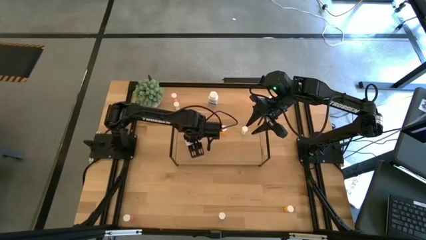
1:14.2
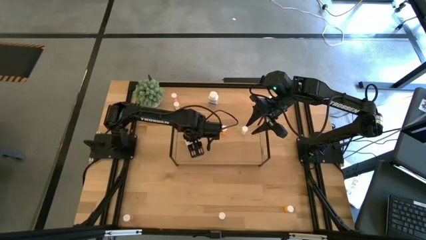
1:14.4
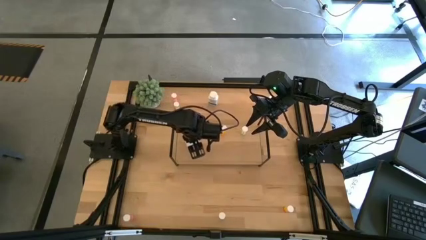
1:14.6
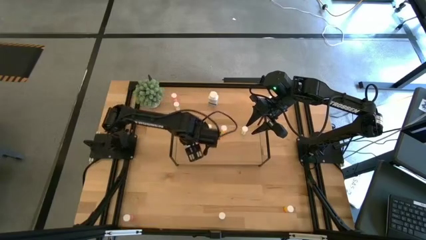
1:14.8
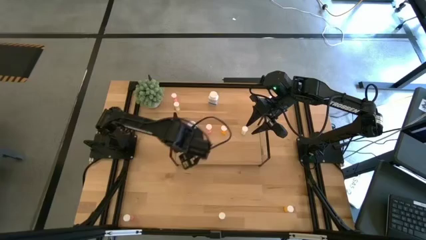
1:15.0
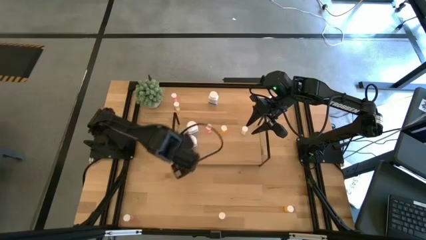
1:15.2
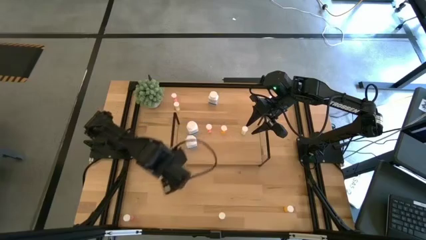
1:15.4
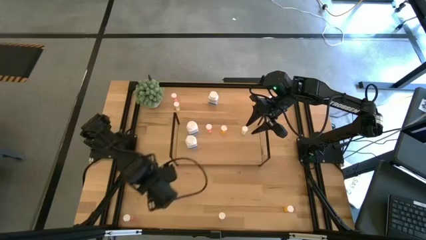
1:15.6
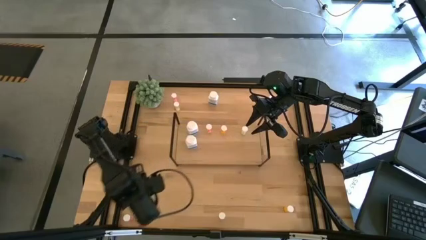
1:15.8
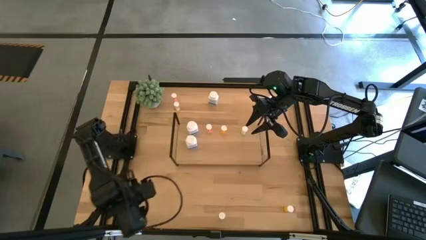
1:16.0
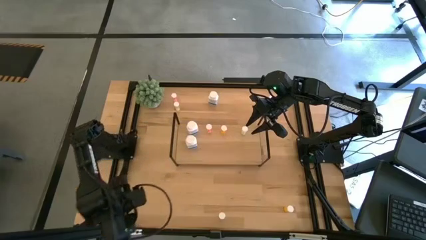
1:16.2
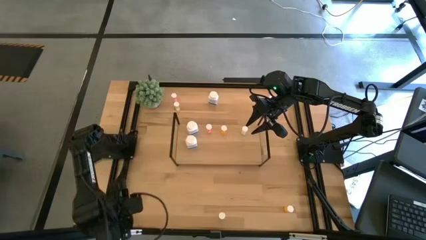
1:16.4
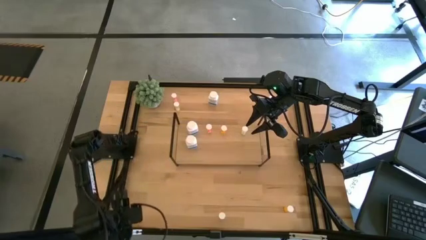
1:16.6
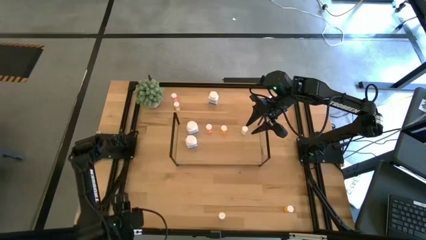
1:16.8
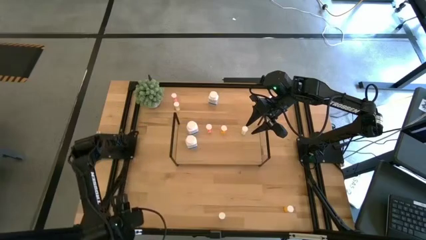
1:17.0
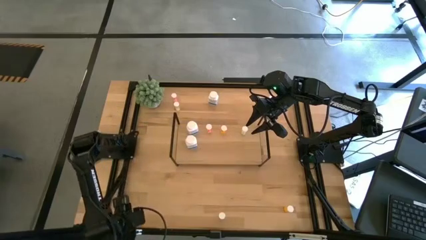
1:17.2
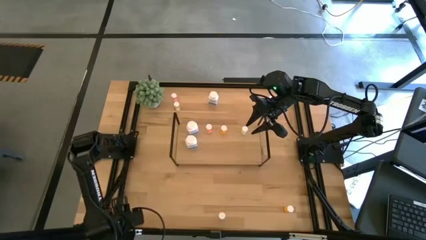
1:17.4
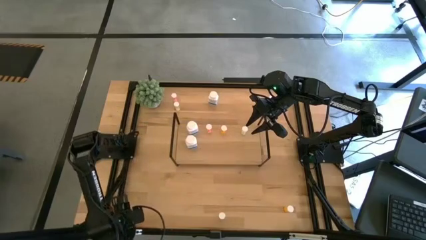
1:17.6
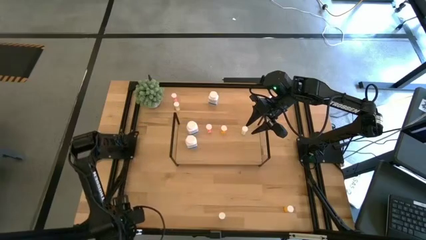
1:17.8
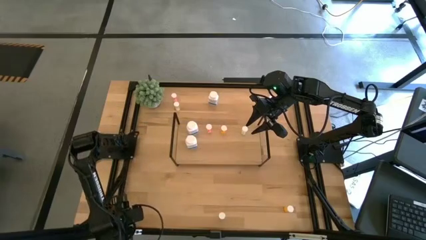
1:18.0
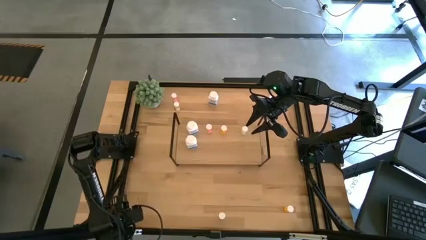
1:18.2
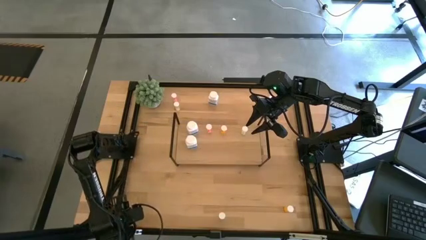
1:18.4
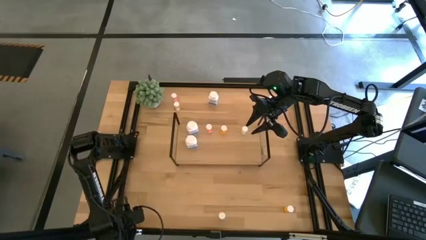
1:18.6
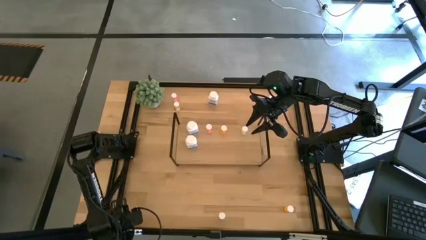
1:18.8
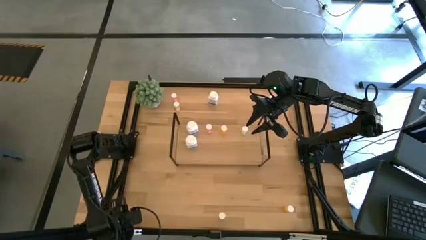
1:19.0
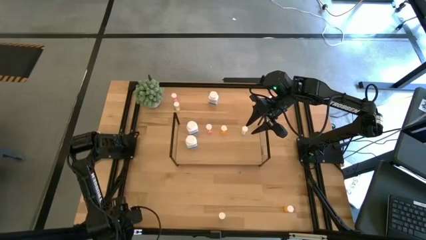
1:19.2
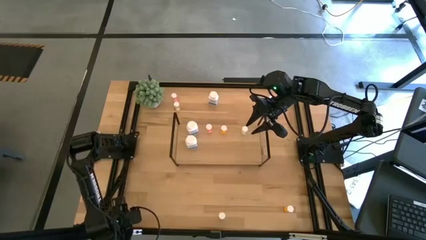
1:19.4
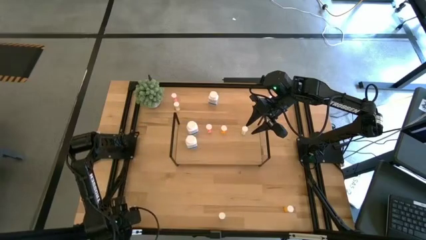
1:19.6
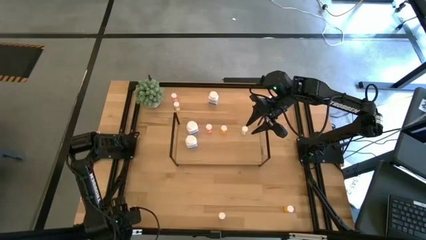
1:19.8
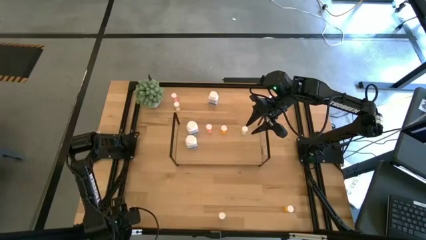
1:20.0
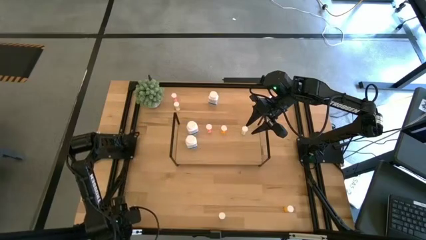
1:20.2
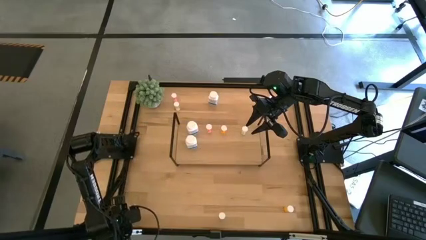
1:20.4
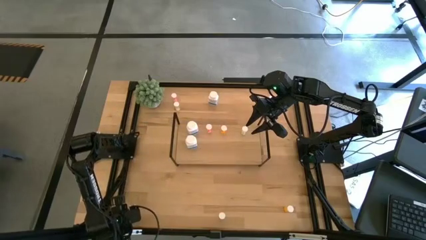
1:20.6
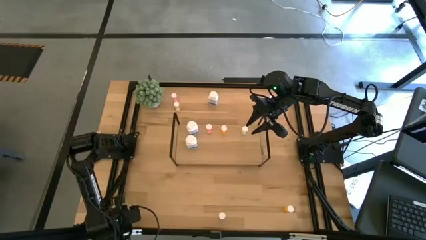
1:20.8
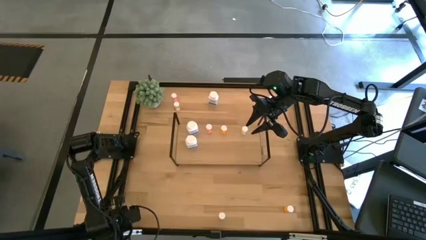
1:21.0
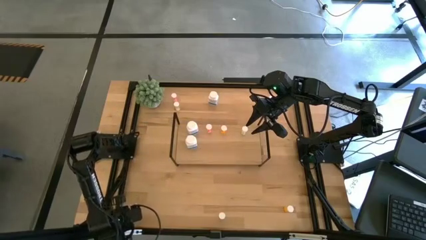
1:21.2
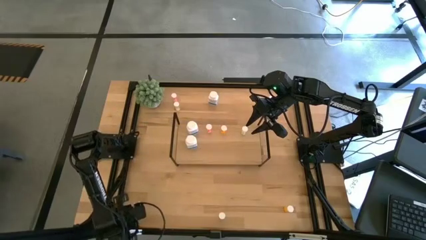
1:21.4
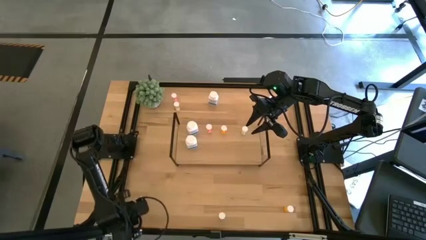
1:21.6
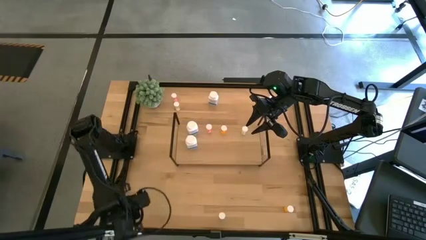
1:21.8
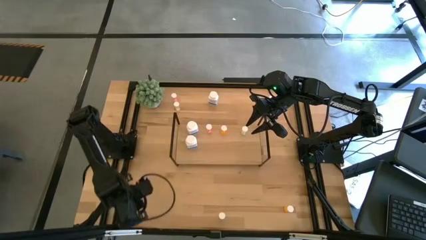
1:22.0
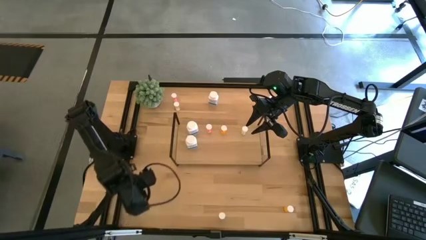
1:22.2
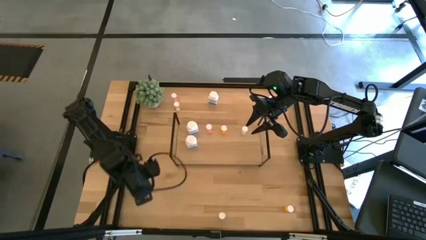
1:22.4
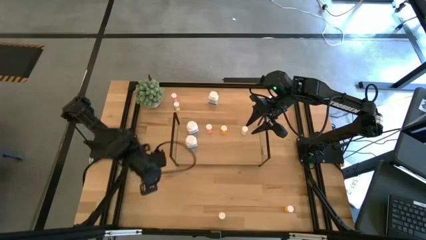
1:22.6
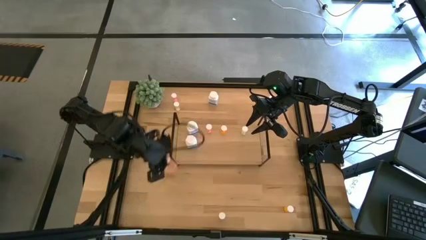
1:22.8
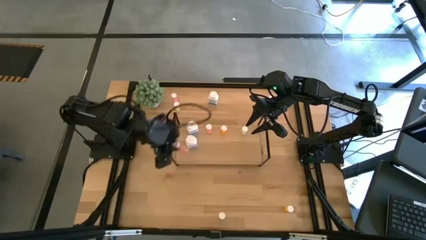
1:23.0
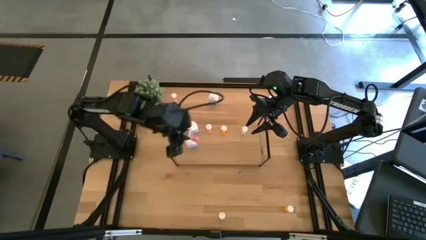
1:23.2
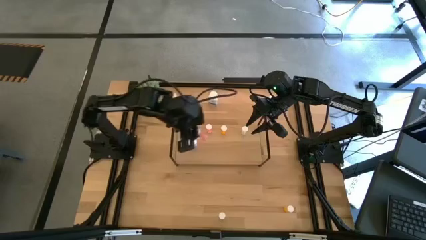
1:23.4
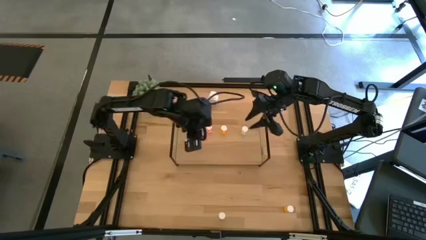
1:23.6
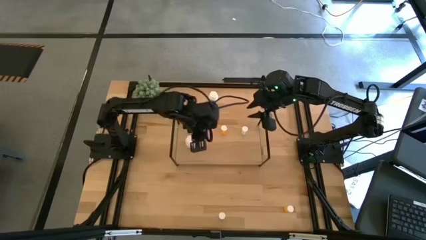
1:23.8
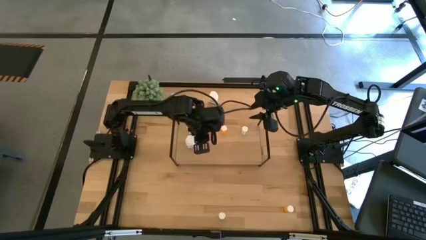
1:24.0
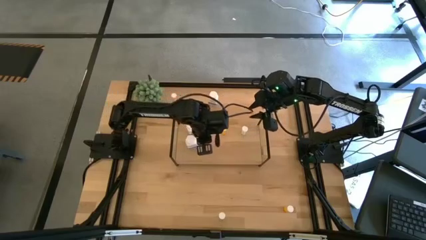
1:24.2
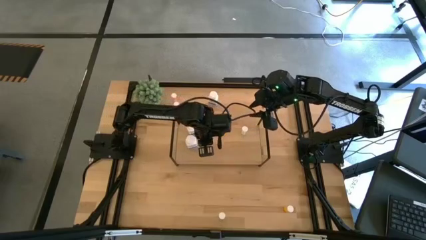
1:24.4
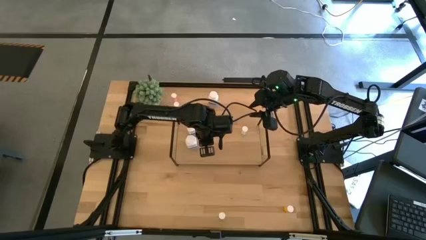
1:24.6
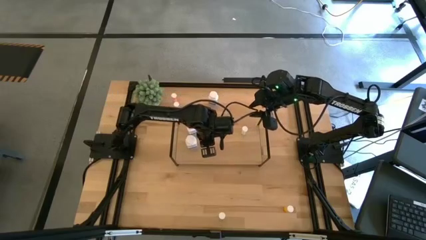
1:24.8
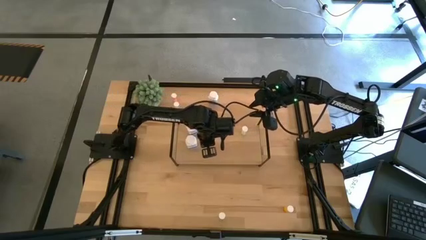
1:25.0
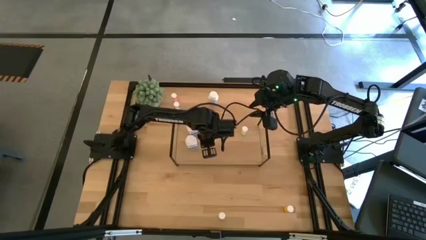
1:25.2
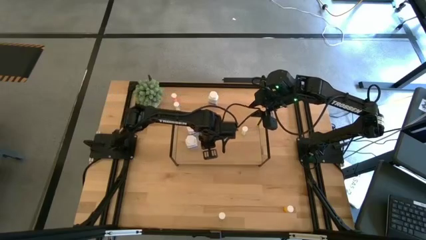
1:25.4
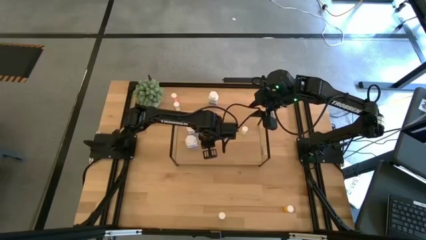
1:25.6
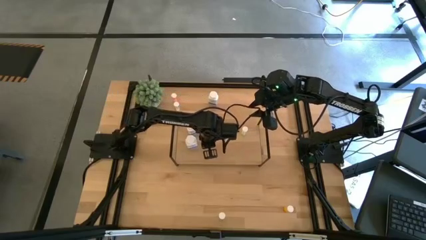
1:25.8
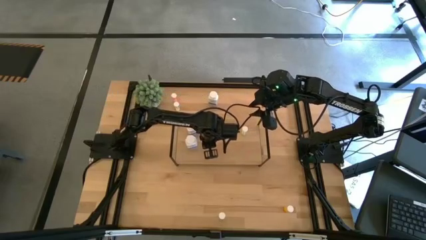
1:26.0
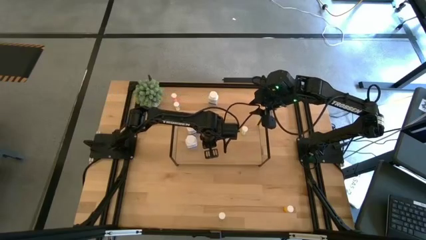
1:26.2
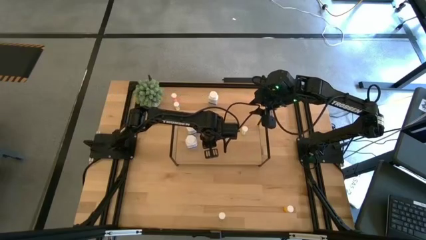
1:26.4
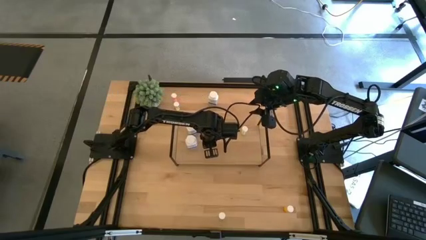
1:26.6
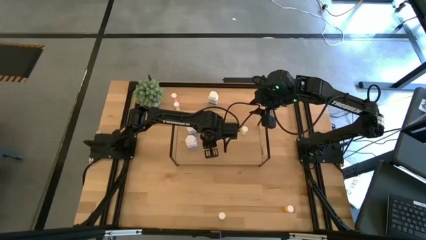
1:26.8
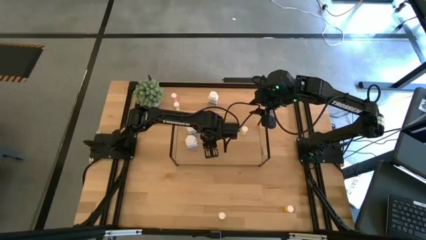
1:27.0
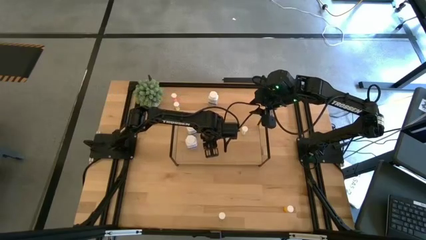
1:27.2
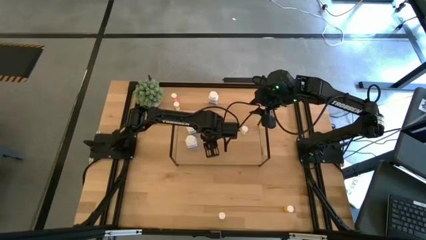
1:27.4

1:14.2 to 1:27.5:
Task: Pick and place medicine bottles onto shelf by color
Put the bottom pink pill bottle on the shelf aligned with the other pink pill bottle

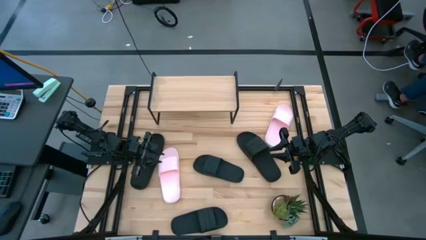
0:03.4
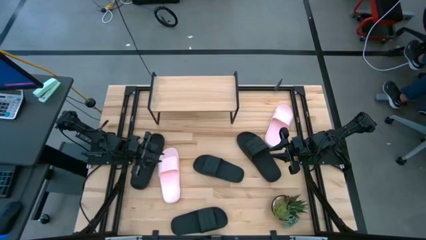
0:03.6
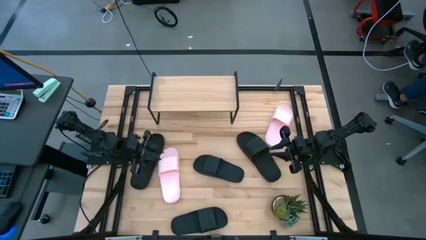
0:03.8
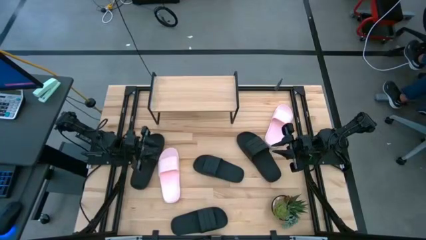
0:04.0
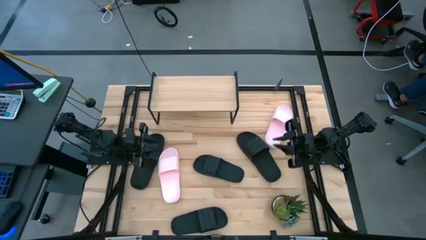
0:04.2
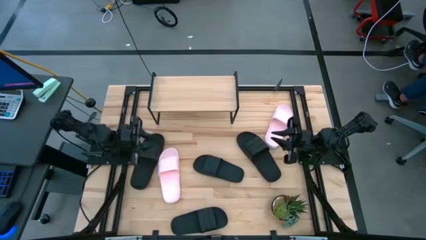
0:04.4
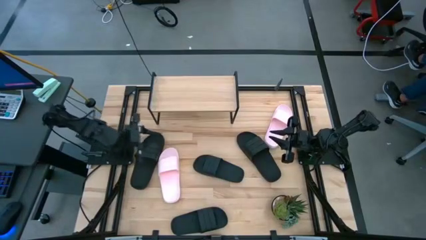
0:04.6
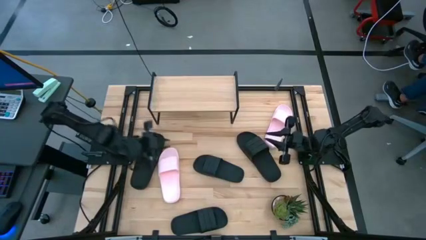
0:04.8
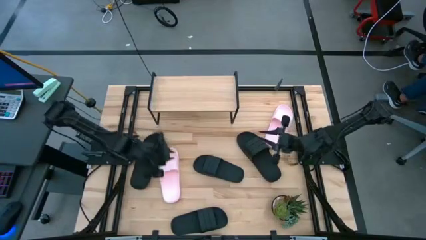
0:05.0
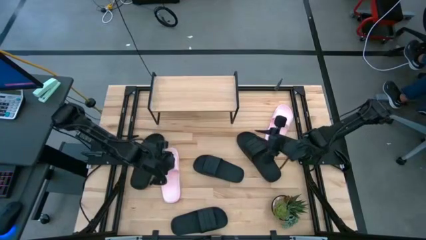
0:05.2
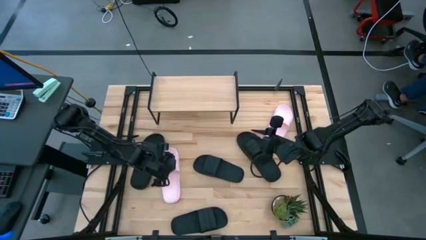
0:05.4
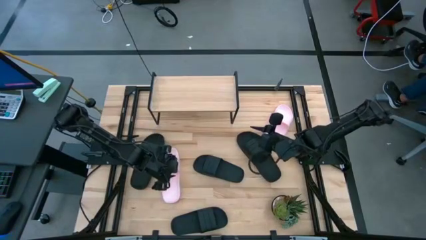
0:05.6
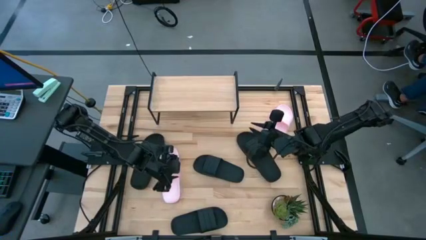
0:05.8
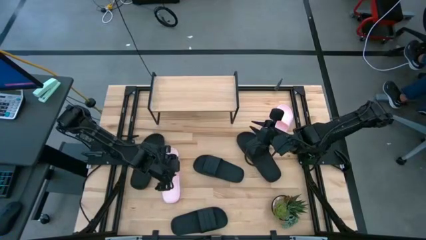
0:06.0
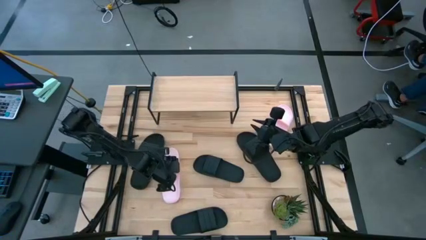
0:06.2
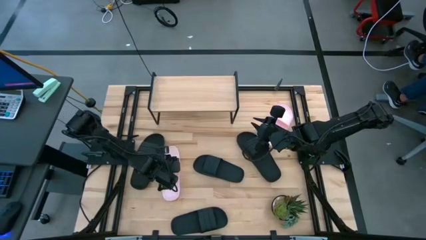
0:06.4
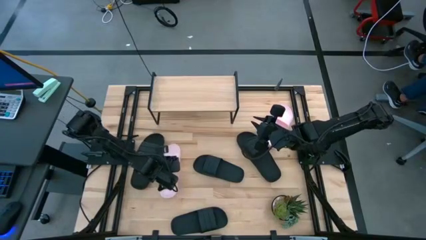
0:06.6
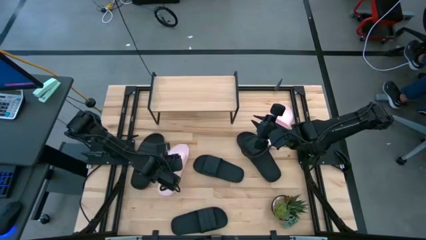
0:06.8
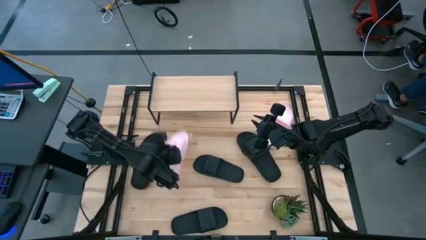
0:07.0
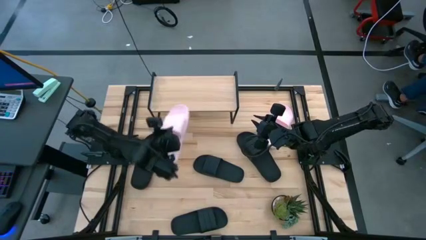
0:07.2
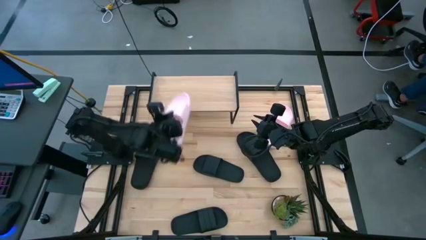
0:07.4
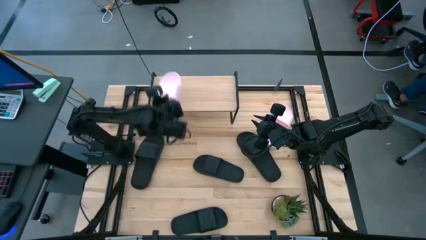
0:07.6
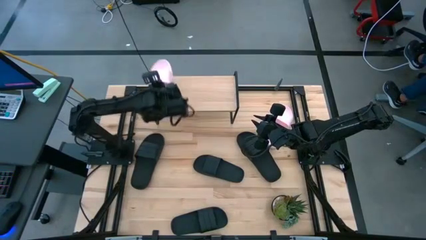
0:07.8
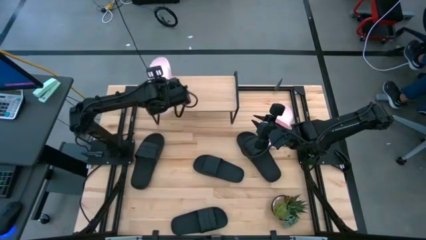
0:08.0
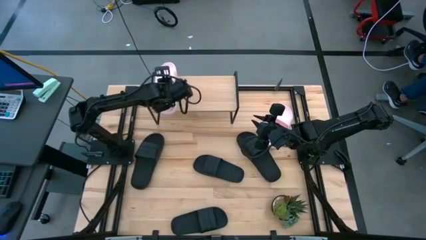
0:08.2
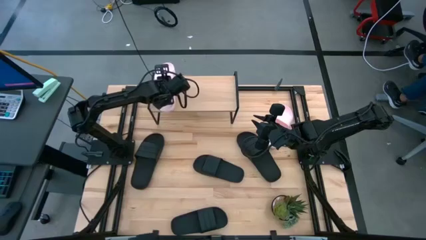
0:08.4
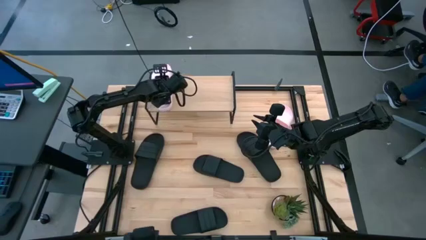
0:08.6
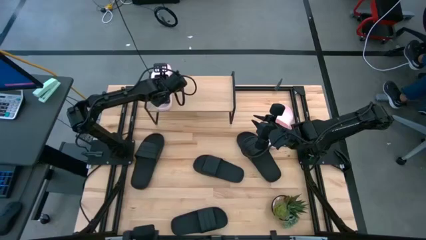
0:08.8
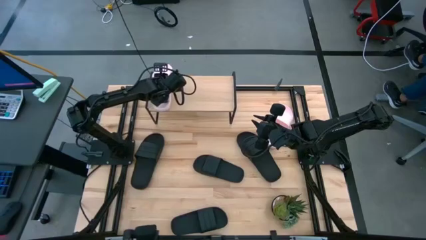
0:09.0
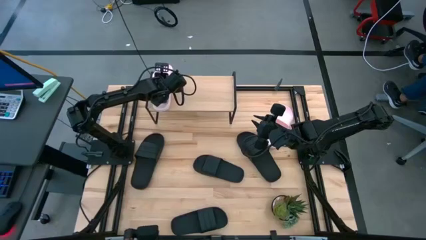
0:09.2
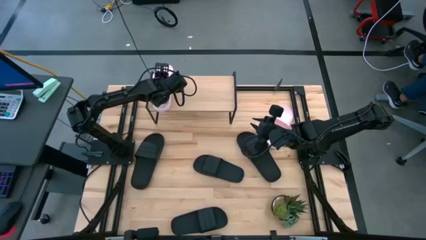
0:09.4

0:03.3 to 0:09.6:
Task: Pick and place slides into the shelf
Put the pink slide on the shelf
